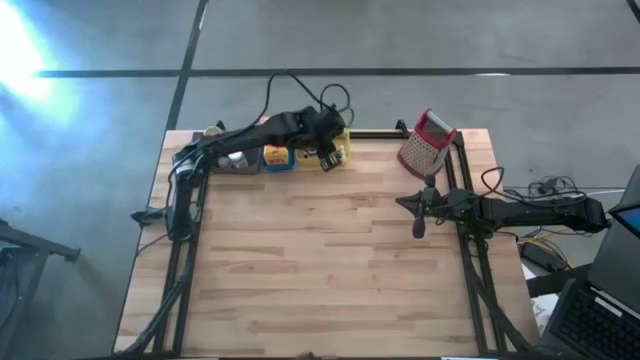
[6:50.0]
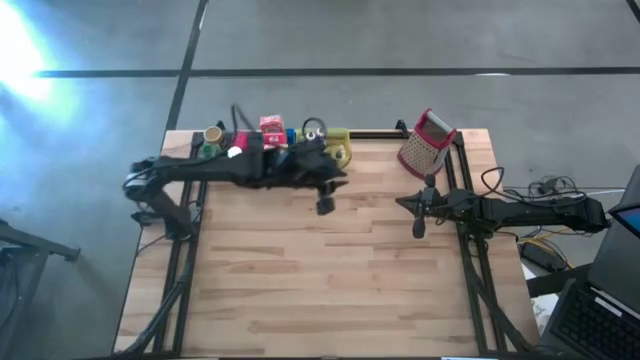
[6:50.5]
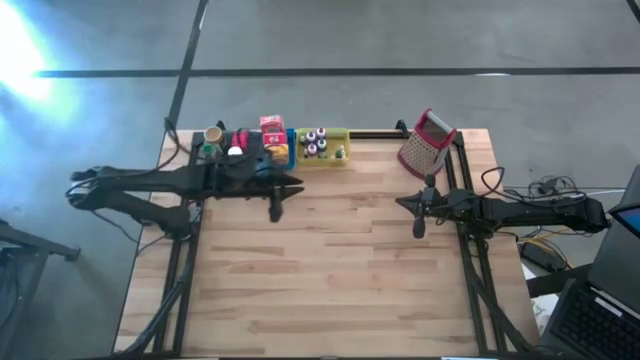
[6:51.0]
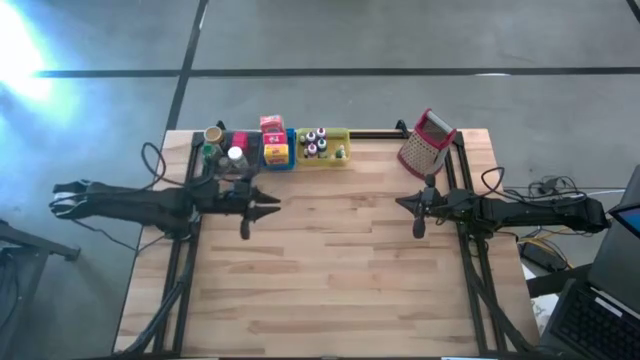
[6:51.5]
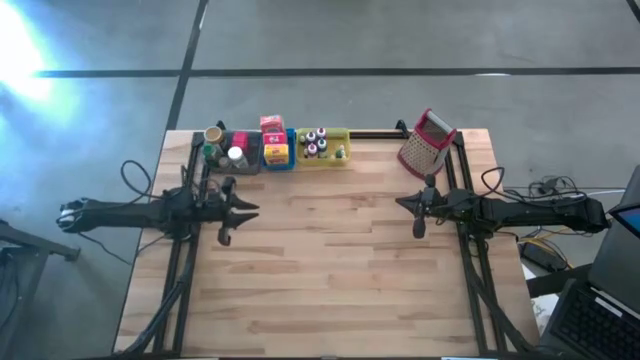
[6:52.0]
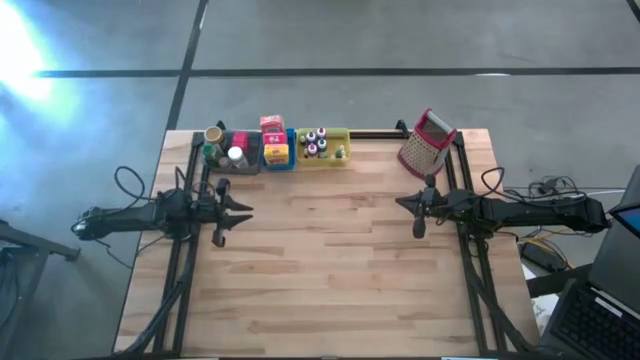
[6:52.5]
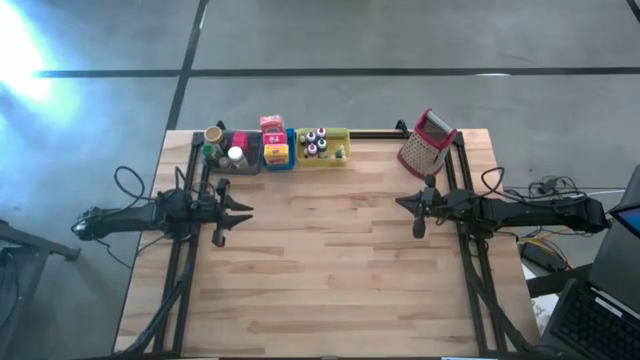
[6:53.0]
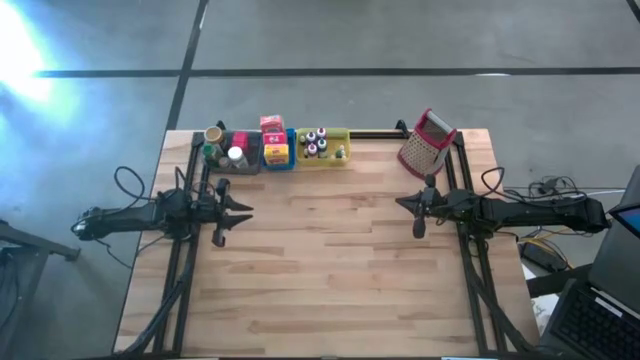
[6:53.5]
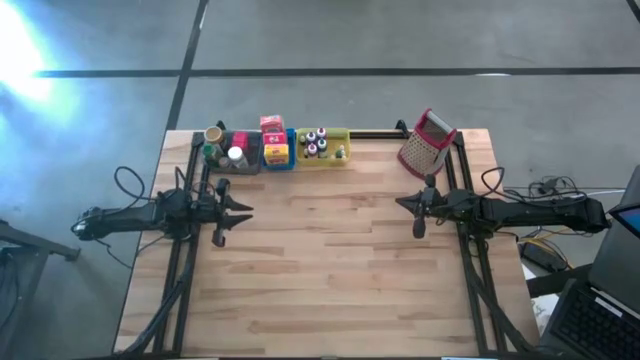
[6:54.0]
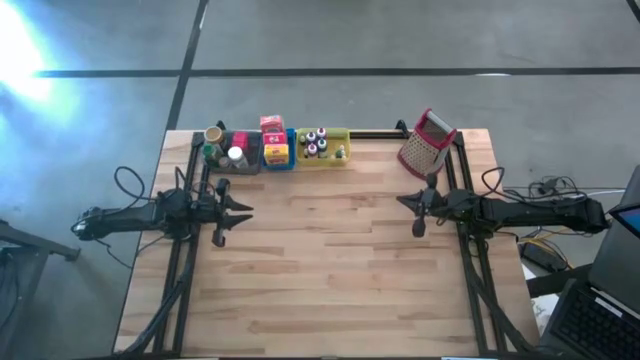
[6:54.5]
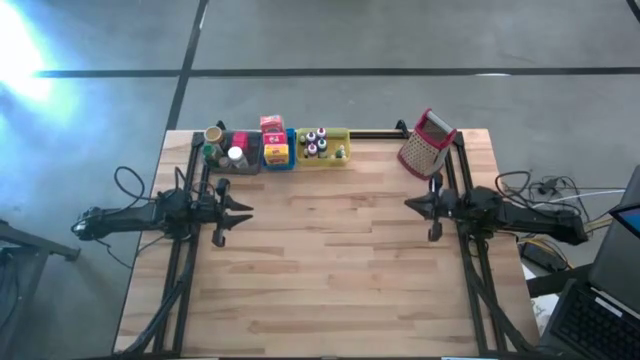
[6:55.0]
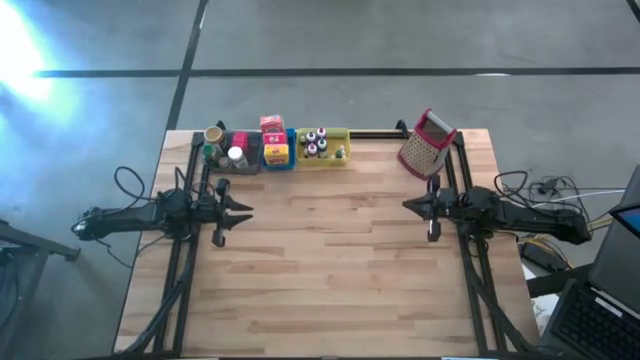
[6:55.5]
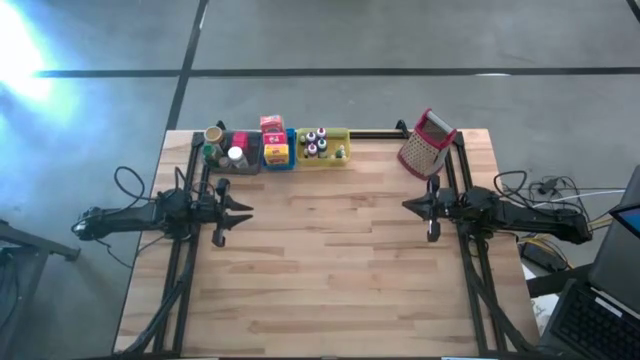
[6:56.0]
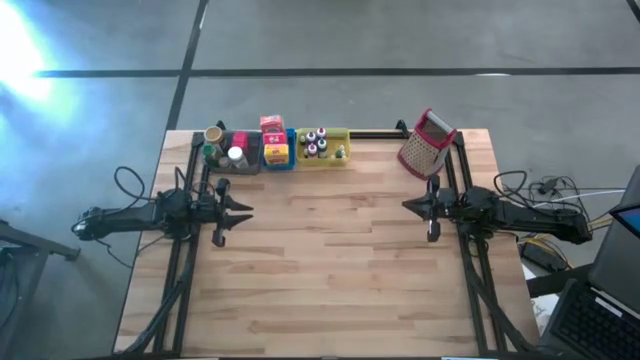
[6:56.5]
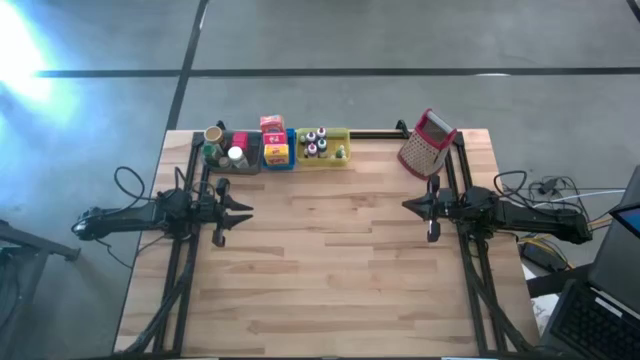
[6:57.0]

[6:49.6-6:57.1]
Task: Pick & Place Kitchen Items
Return to home position

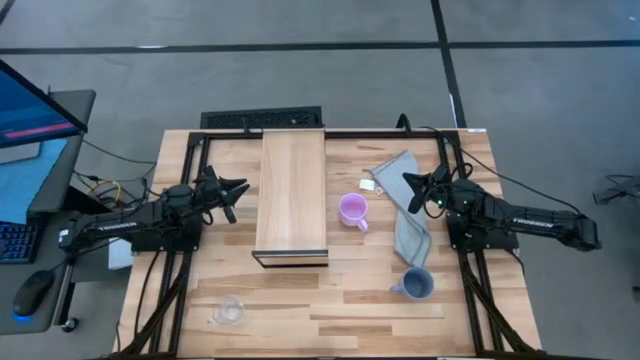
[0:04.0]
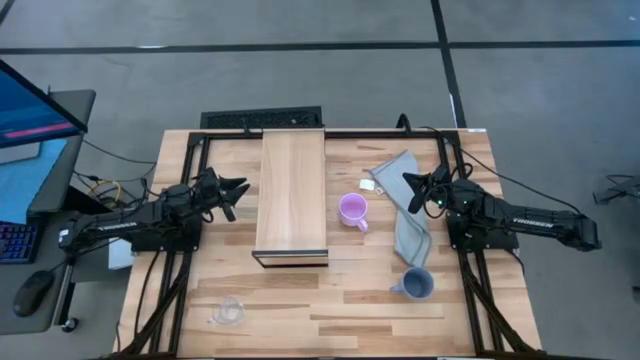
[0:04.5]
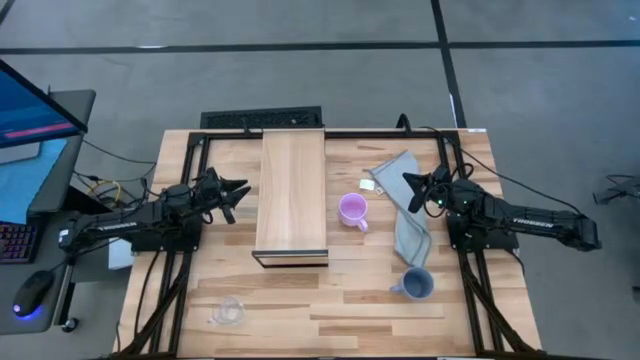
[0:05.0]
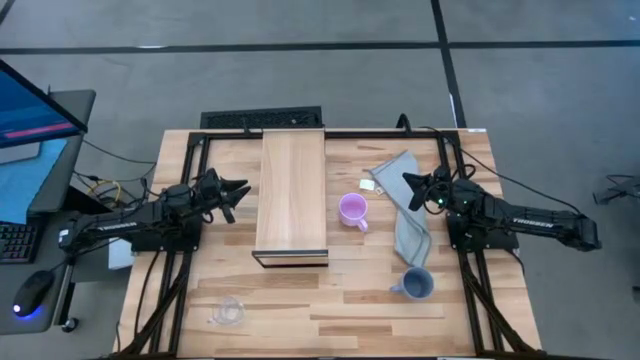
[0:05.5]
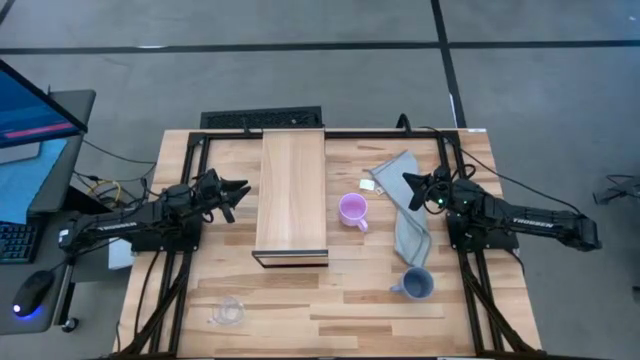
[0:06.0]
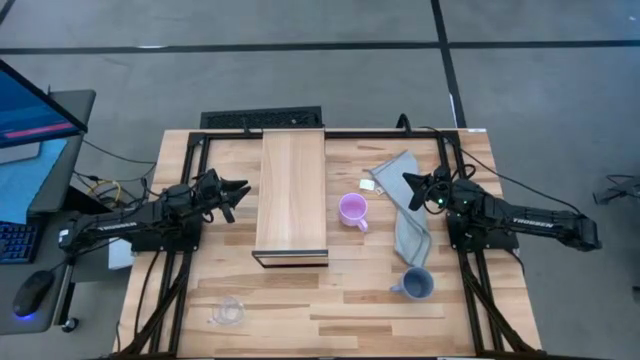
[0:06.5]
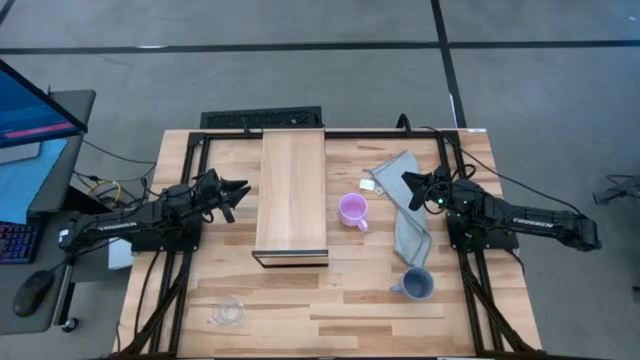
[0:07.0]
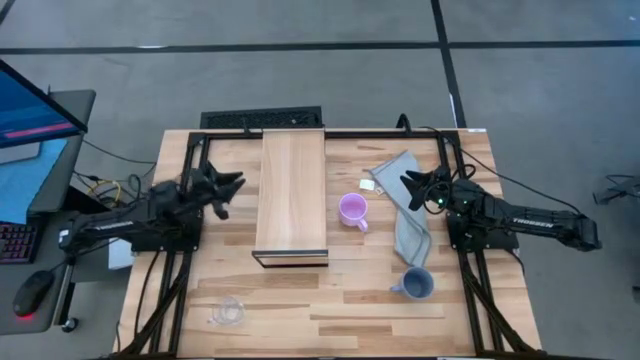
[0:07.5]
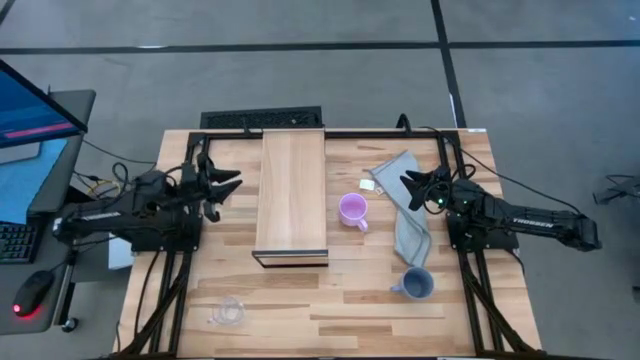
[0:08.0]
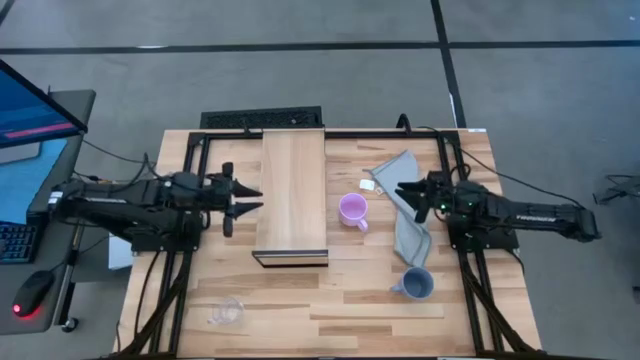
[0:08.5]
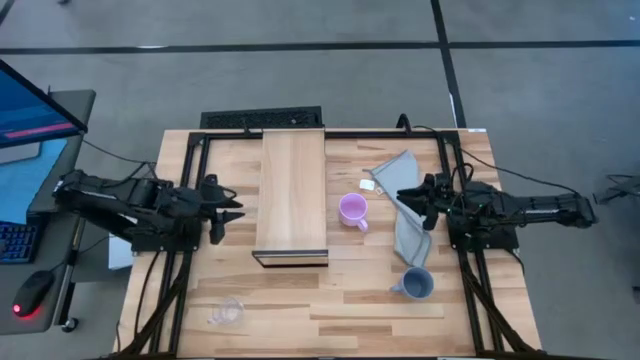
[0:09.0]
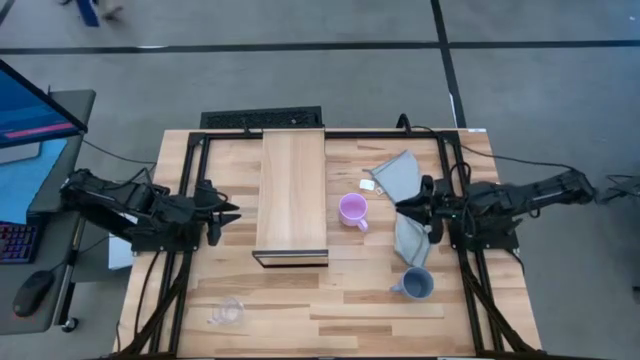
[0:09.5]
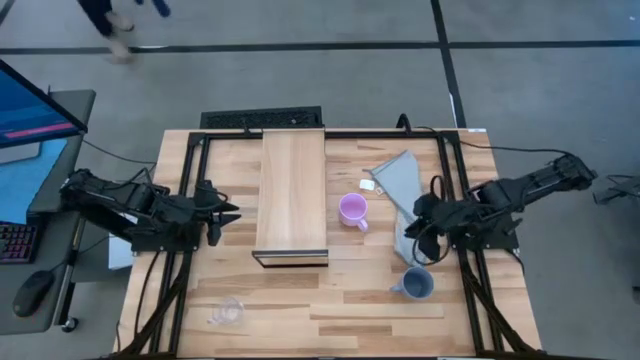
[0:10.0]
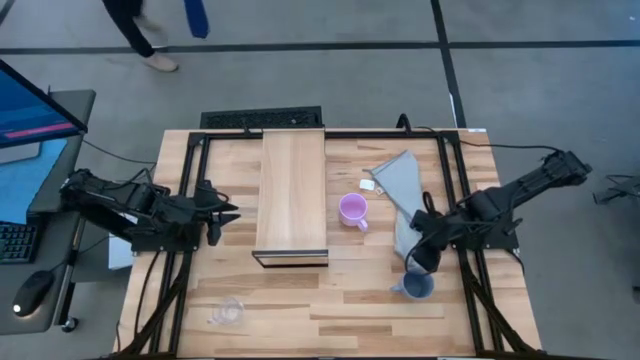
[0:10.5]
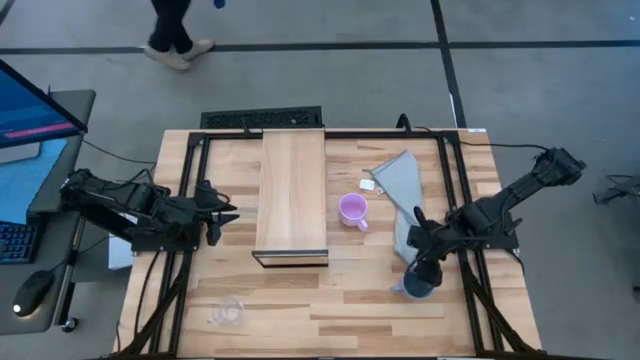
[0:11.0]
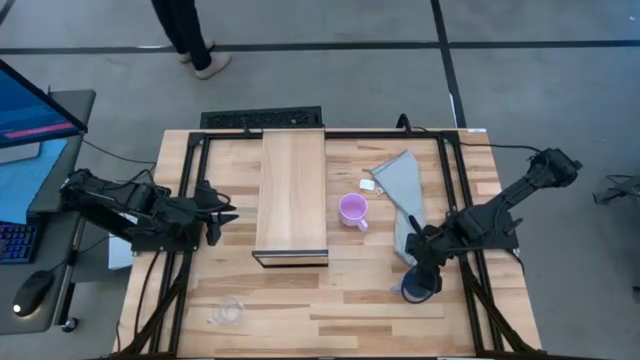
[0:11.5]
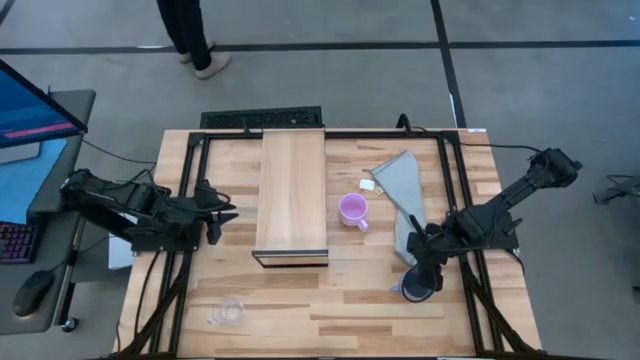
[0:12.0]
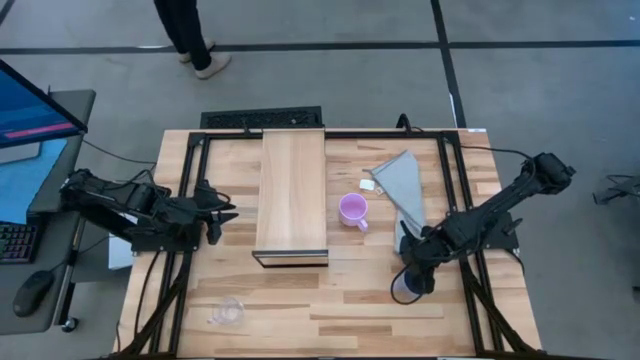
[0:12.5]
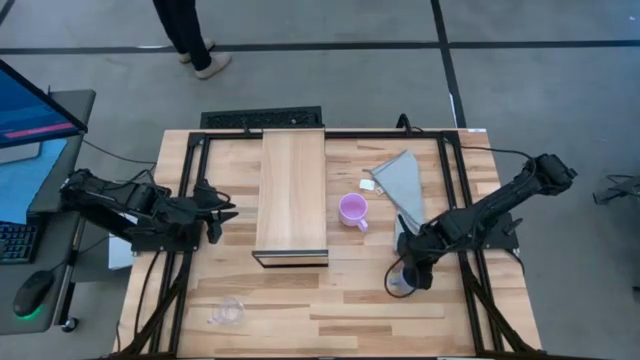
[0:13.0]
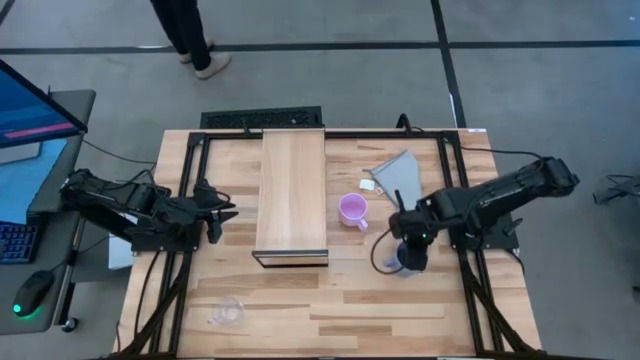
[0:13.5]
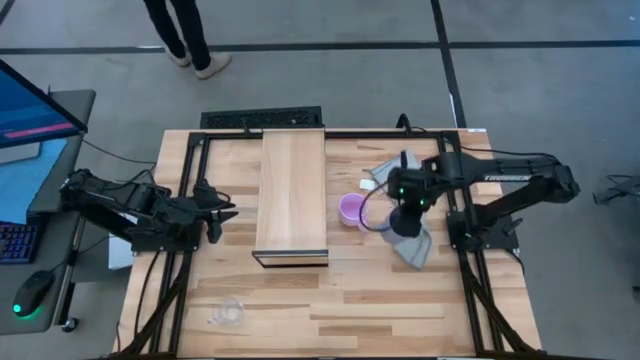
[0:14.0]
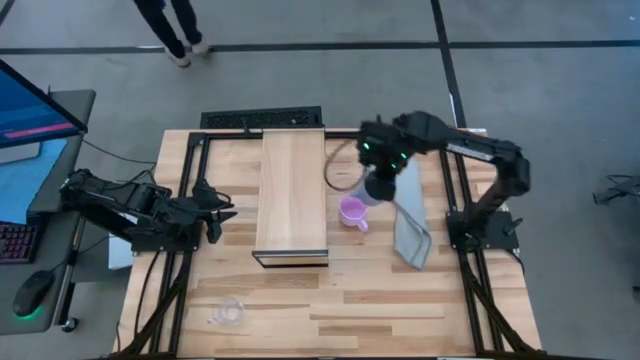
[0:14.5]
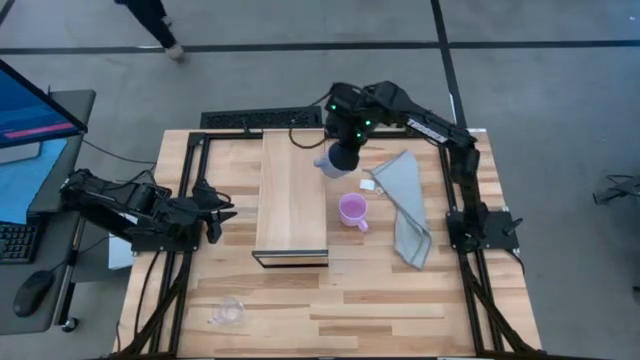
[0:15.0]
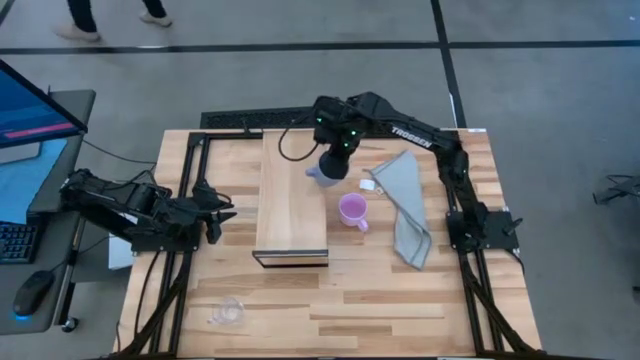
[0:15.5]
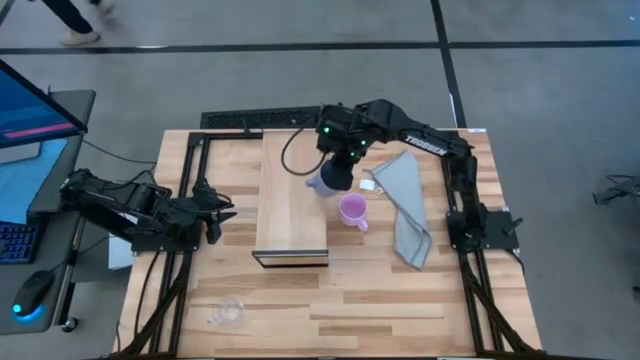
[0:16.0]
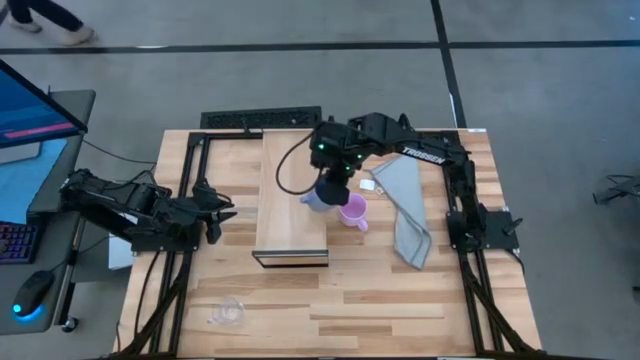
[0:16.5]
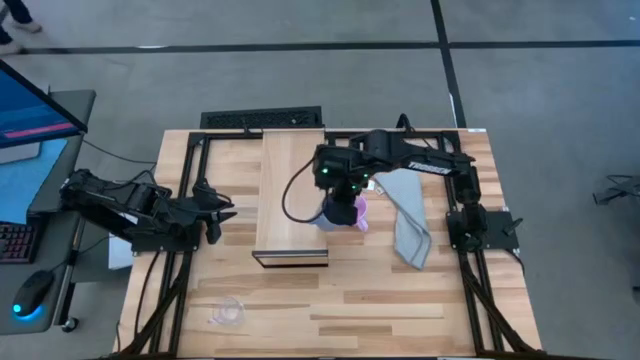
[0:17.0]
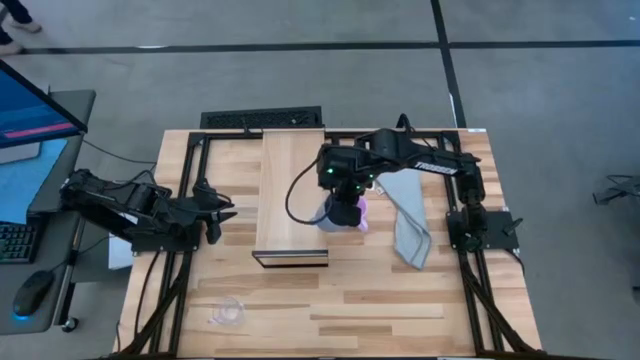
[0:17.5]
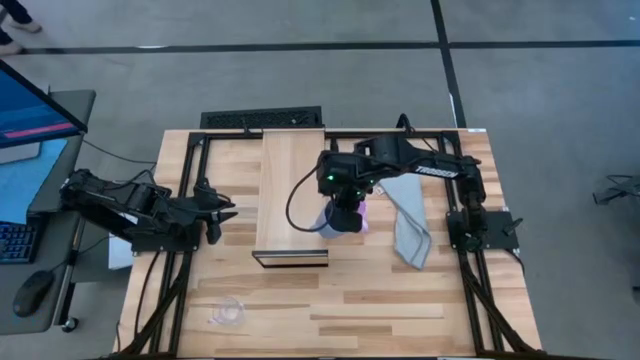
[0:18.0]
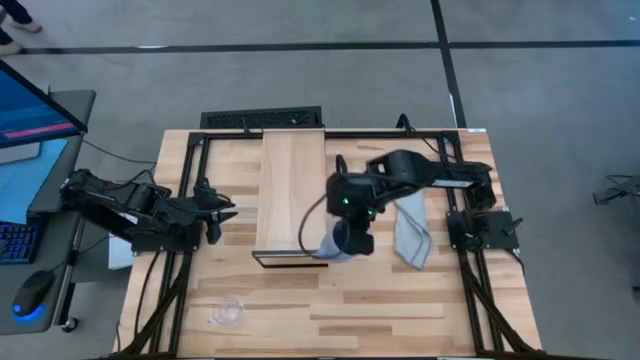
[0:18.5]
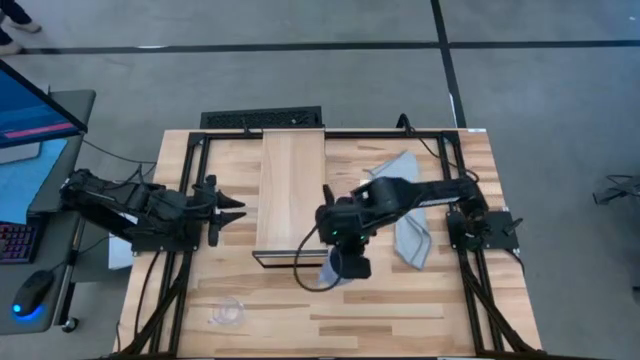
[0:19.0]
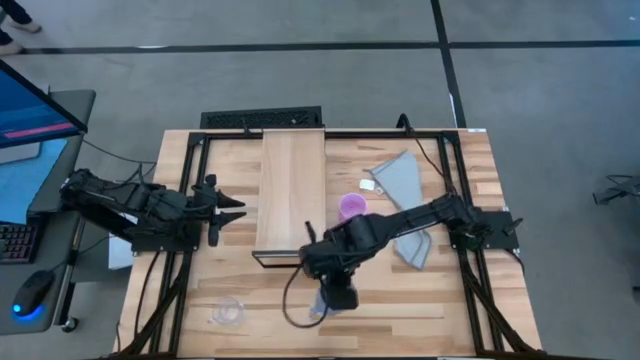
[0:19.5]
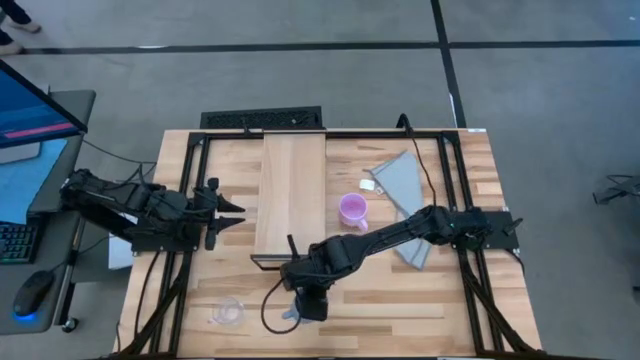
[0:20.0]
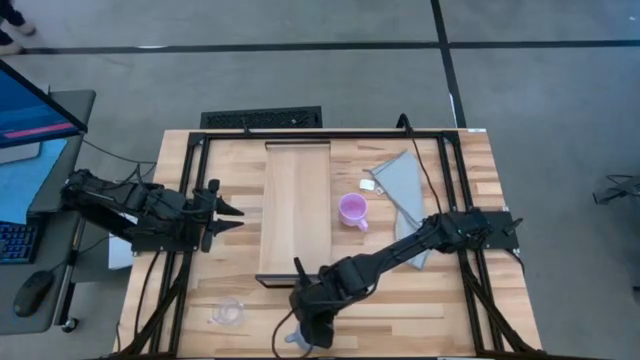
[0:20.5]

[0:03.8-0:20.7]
Task: Stack small to large cups/mugs on shelf
Put the blue mug on the shelf
